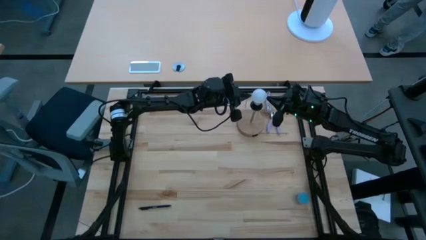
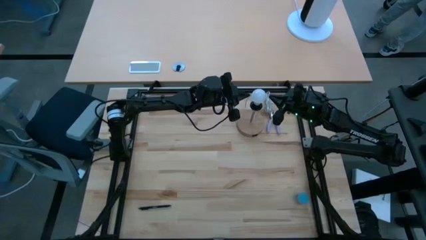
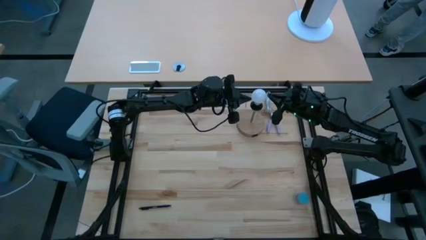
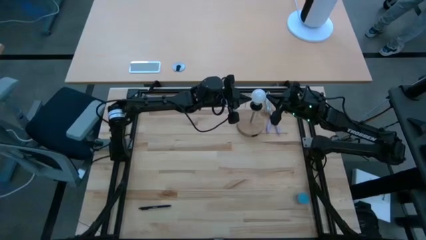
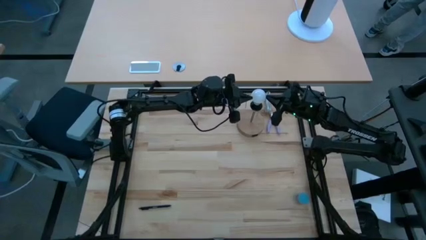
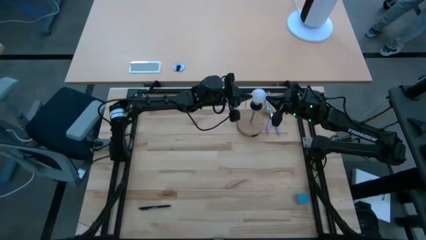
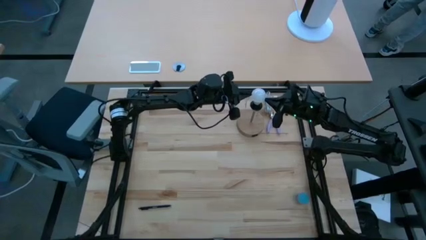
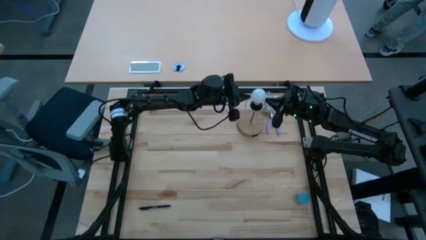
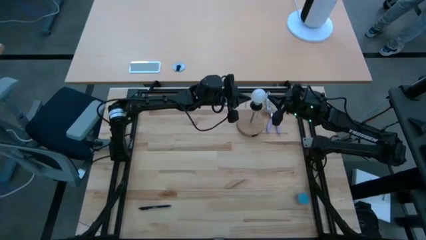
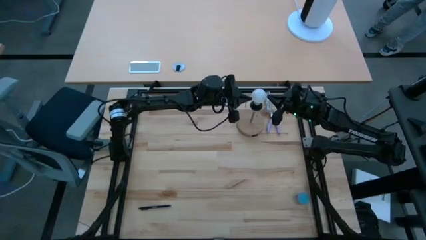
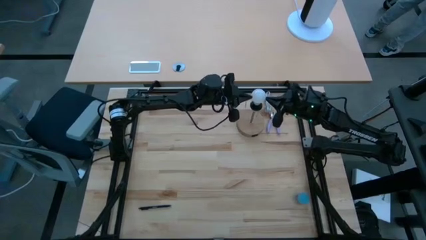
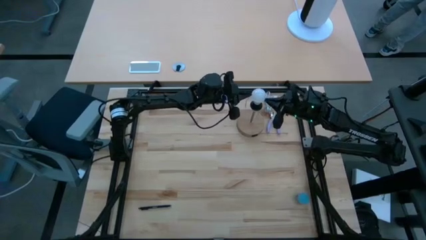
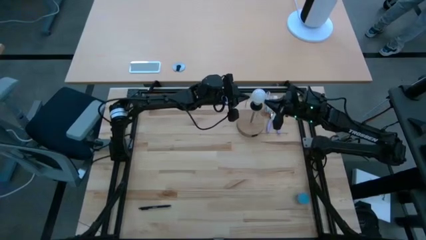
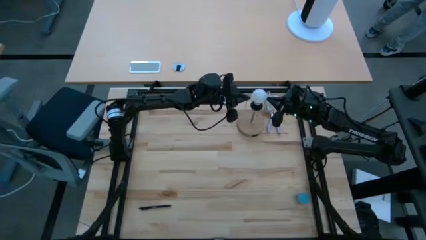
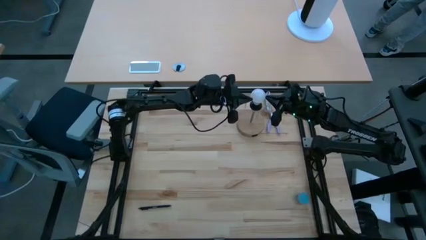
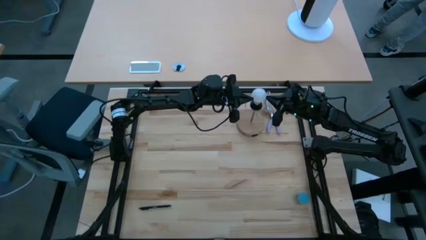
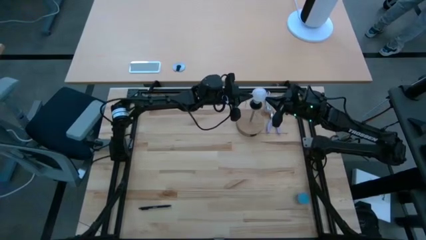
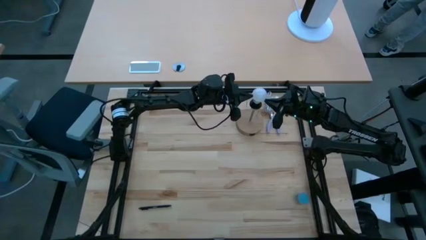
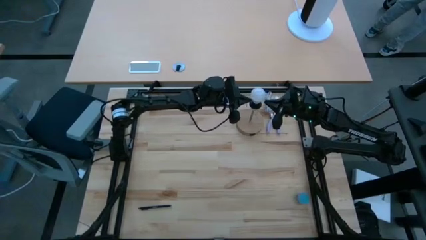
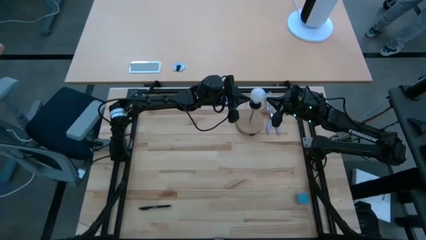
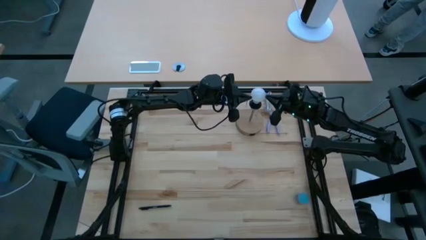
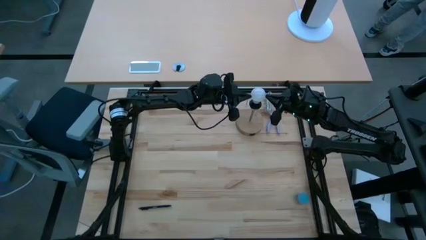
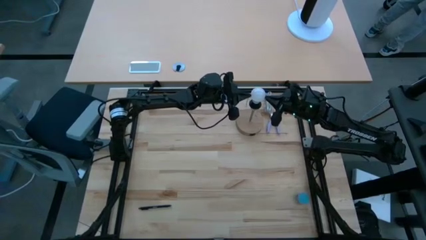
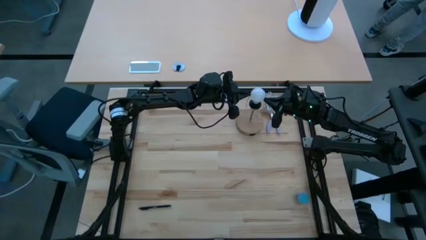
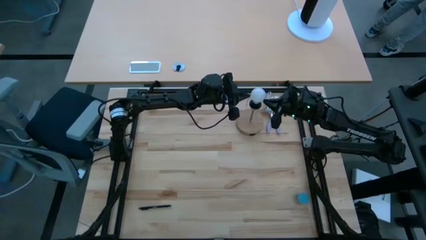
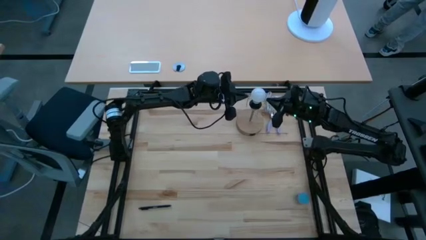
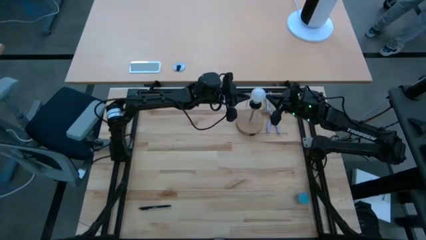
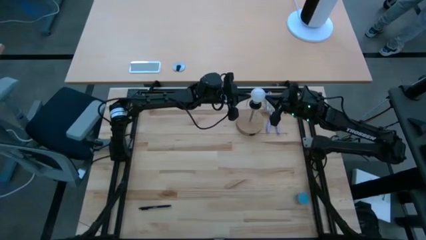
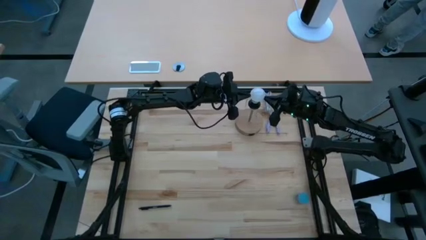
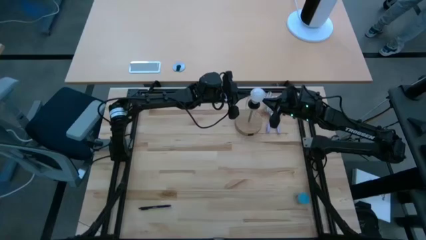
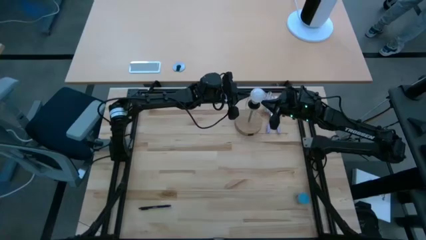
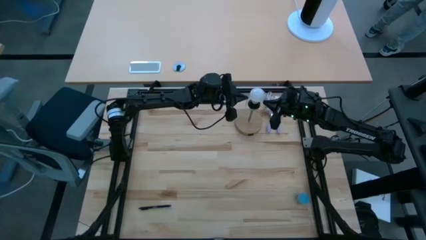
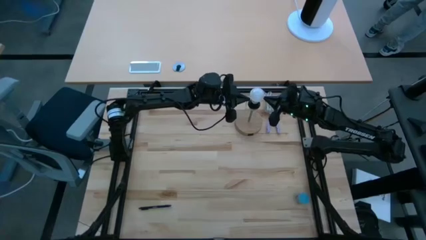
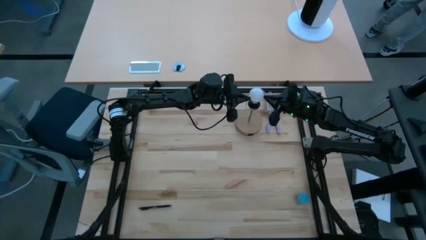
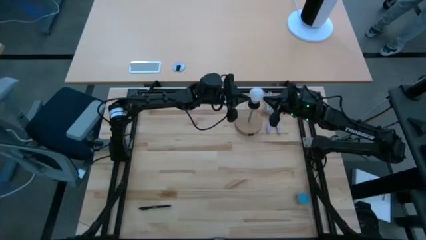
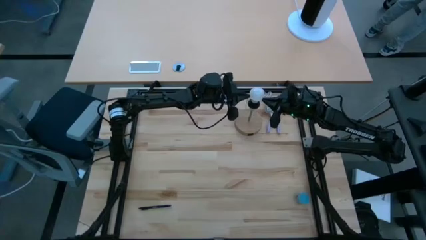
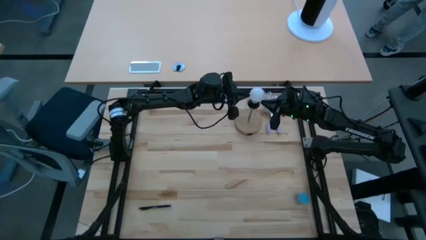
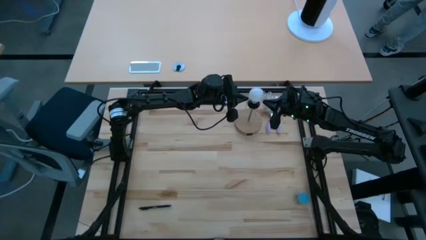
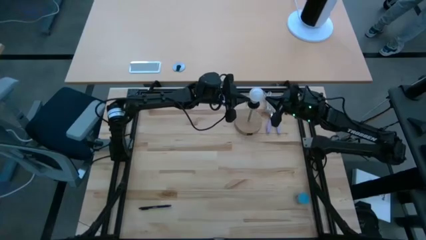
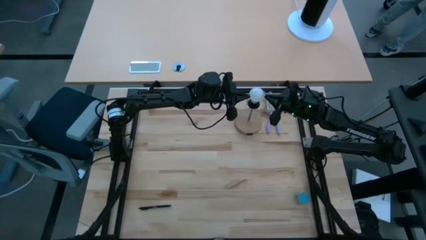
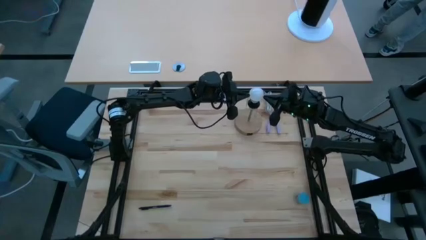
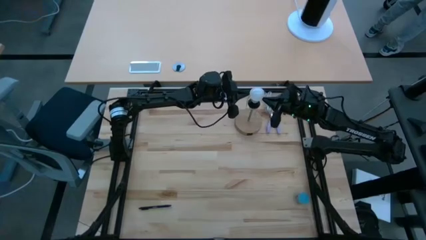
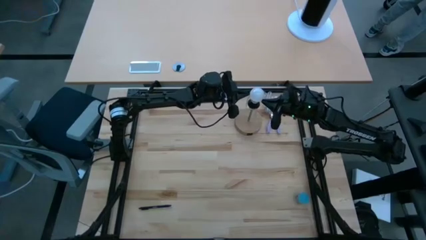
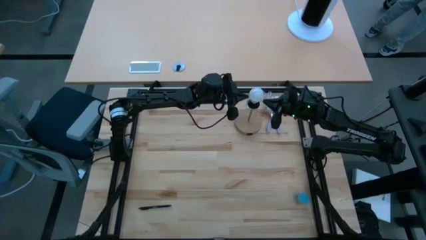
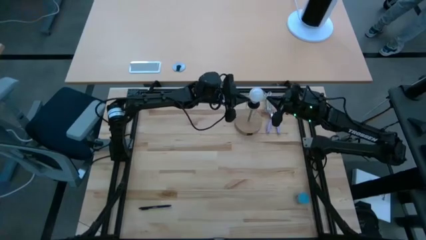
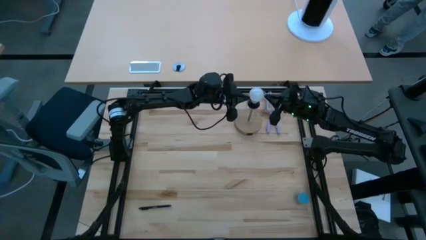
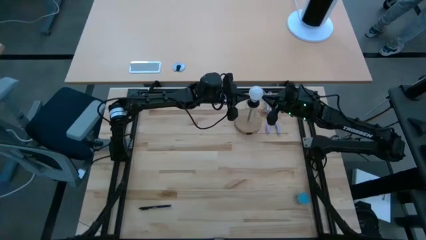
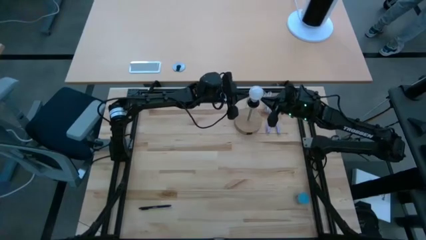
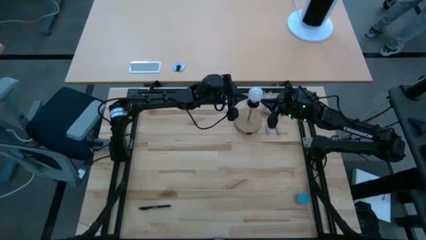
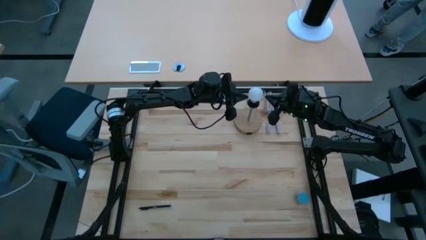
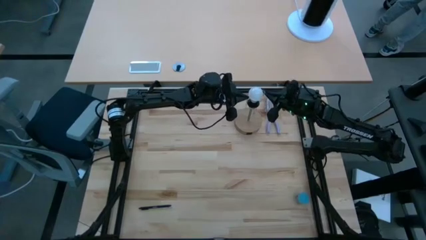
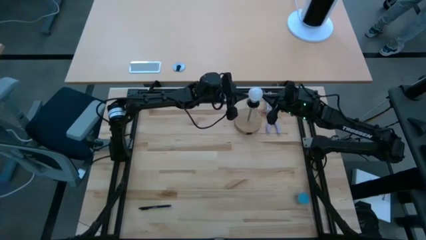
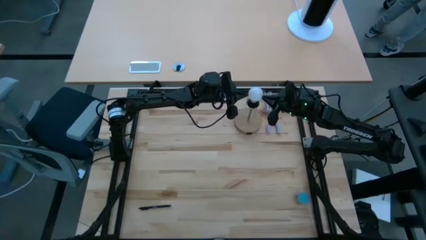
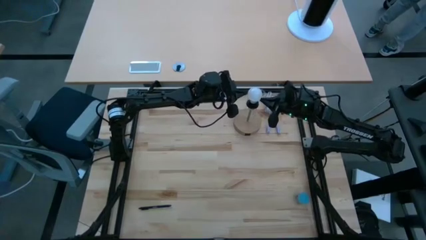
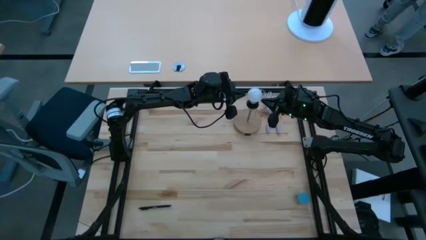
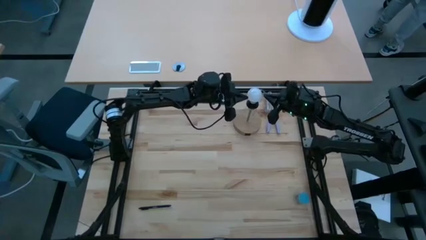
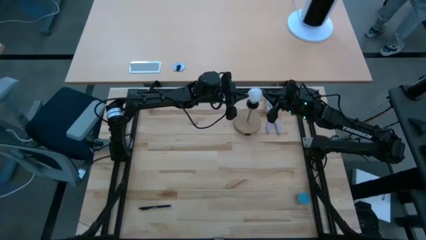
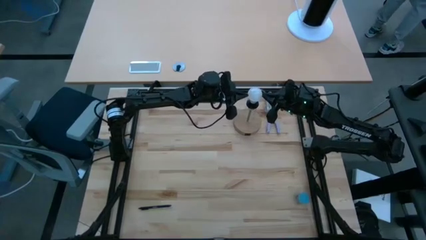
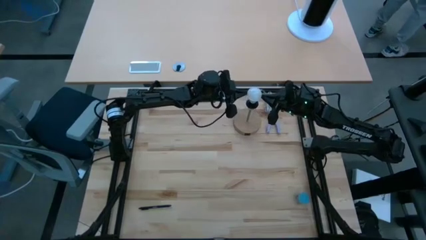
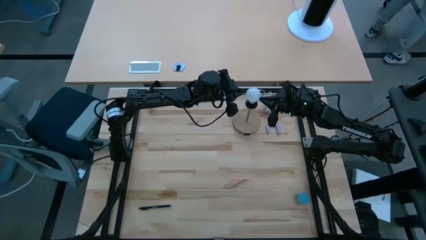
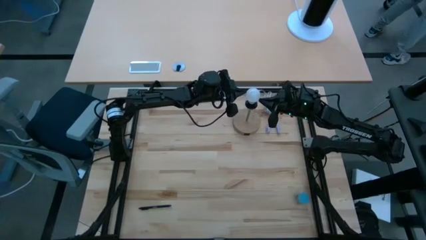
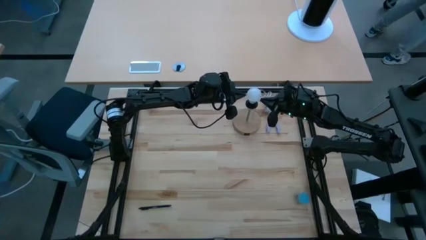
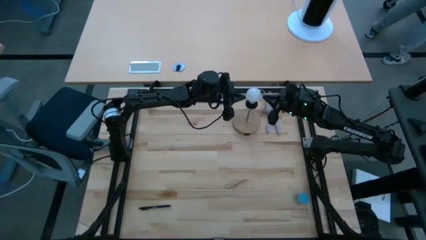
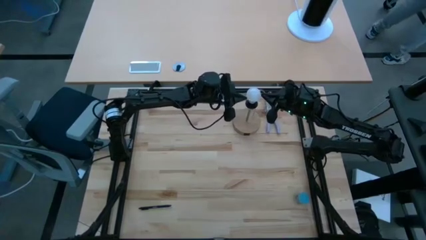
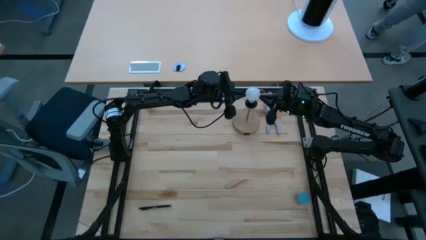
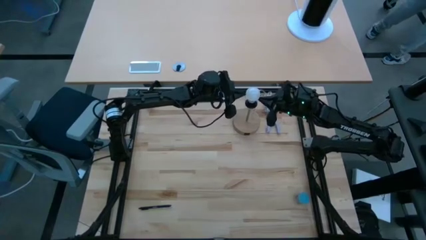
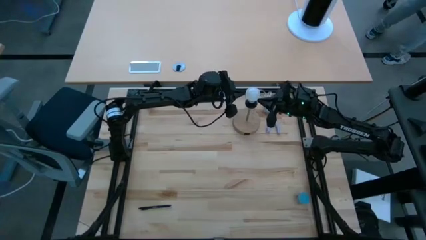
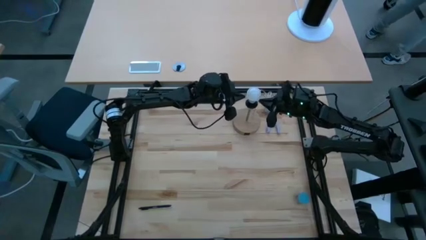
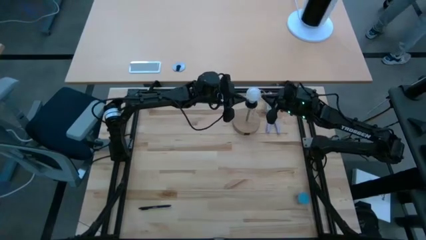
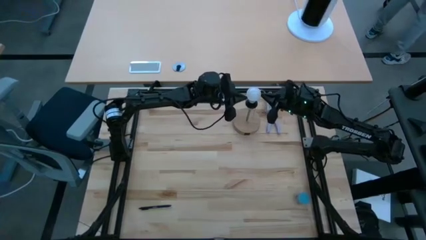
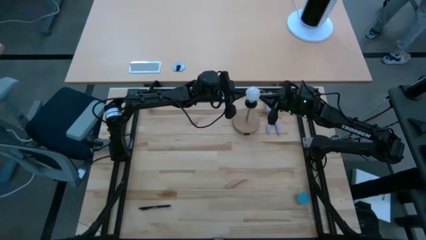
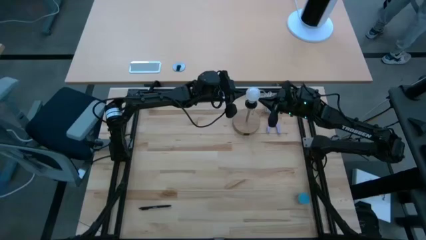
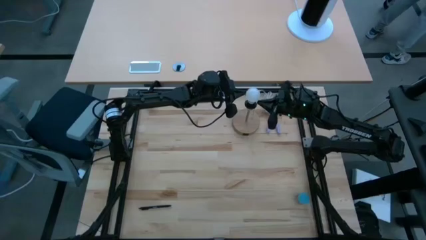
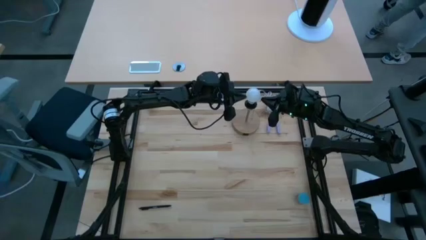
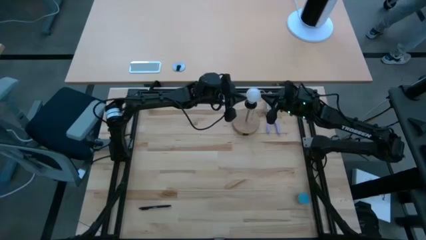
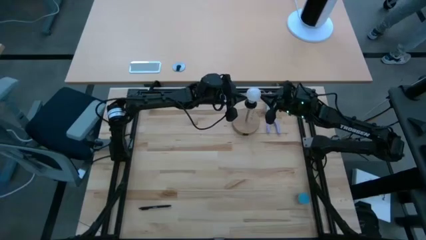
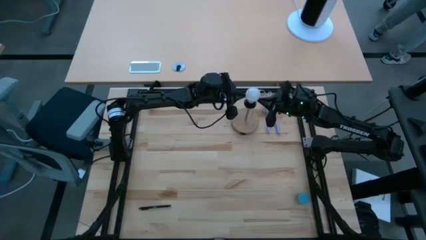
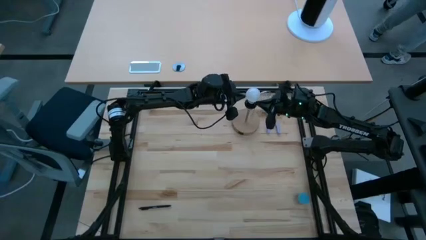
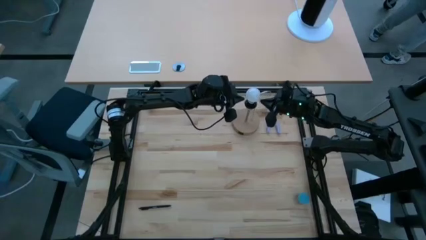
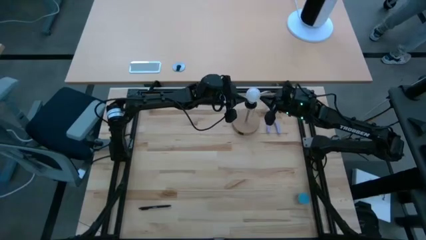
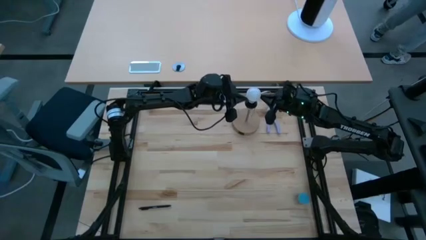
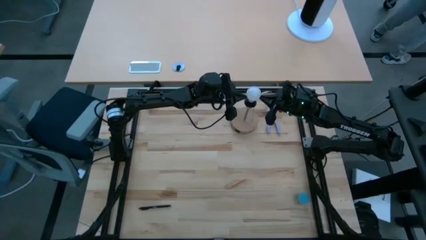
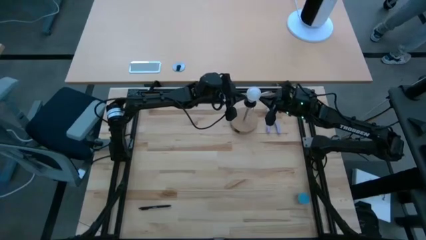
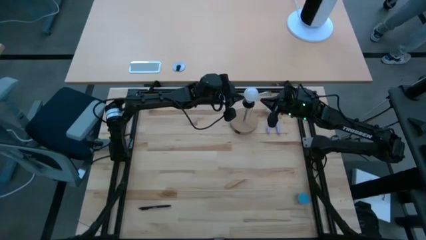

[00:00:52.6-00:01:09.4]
Task: Screw lightbulb
Insert the lightbulb on the lamp
